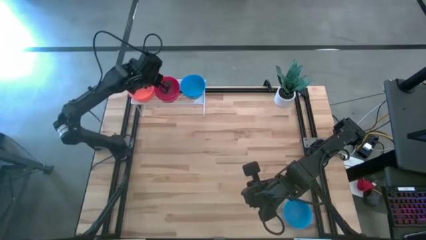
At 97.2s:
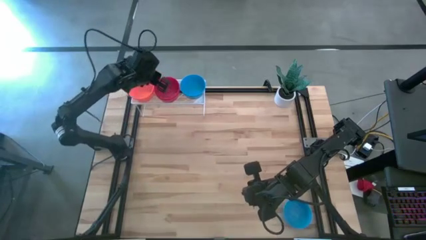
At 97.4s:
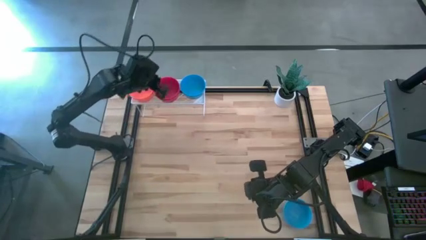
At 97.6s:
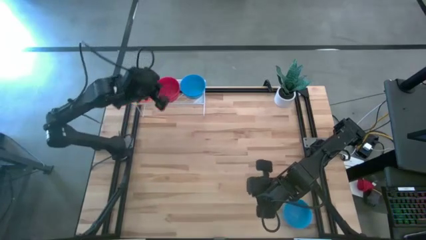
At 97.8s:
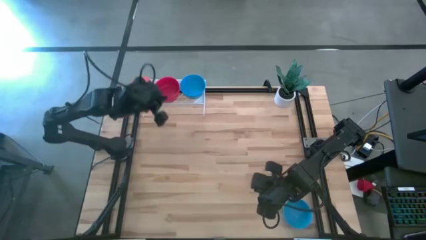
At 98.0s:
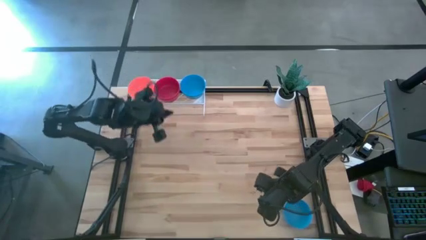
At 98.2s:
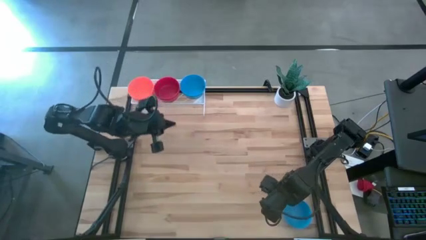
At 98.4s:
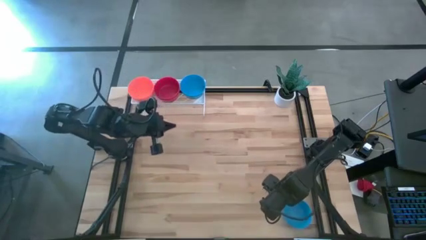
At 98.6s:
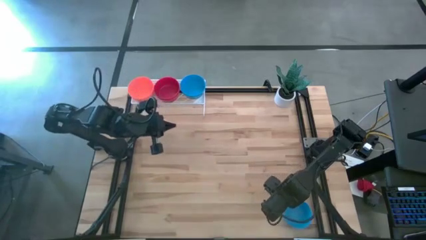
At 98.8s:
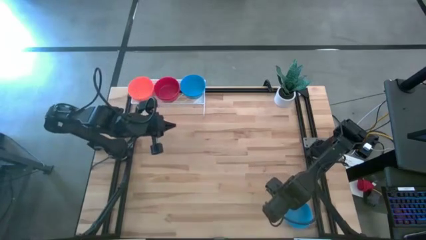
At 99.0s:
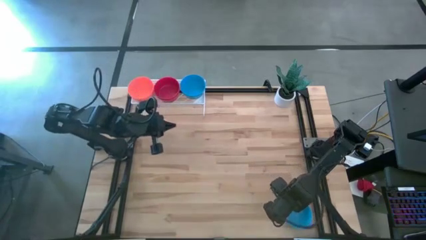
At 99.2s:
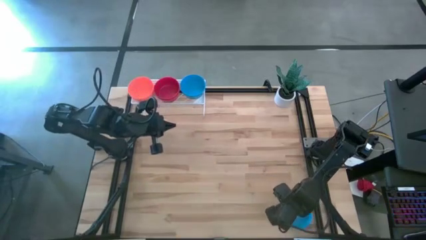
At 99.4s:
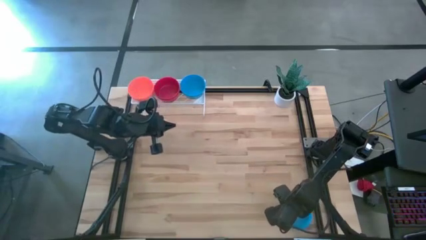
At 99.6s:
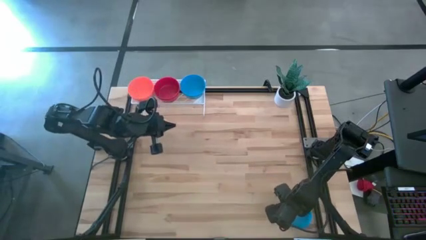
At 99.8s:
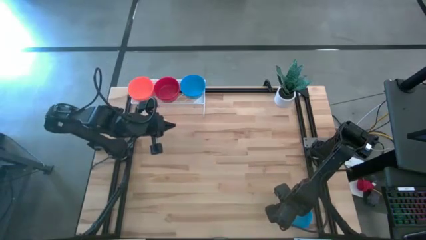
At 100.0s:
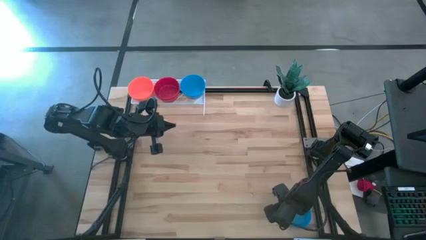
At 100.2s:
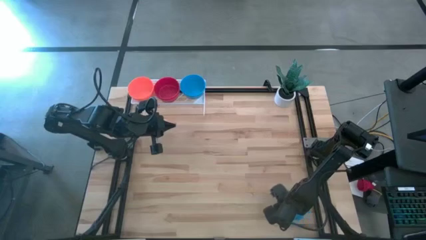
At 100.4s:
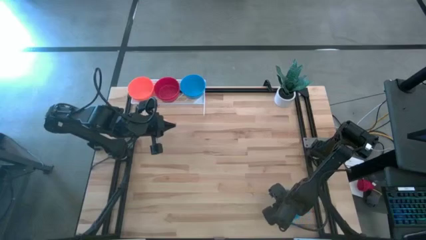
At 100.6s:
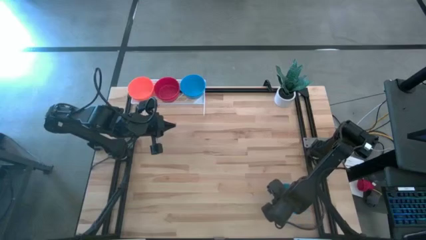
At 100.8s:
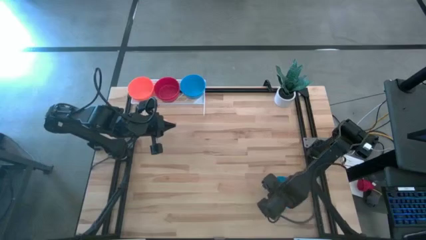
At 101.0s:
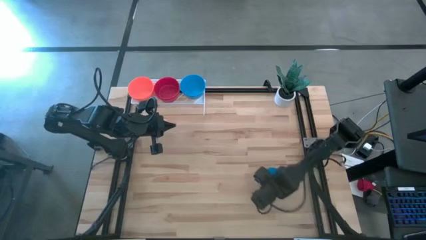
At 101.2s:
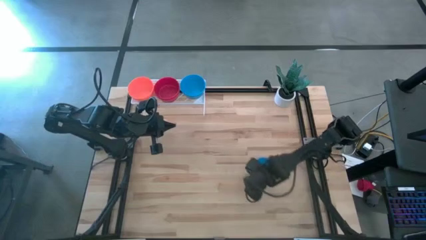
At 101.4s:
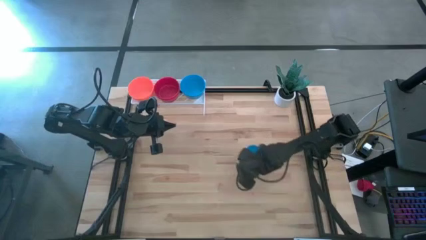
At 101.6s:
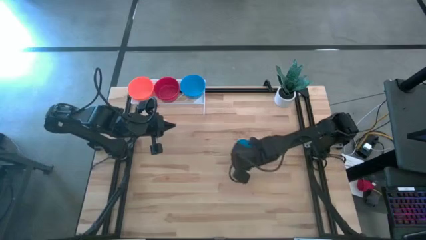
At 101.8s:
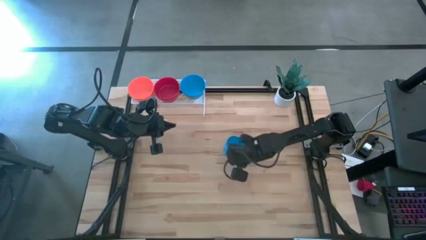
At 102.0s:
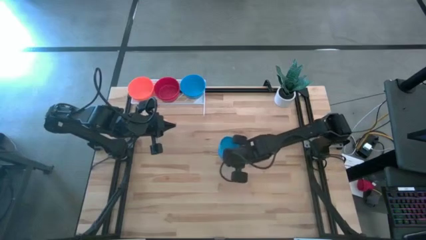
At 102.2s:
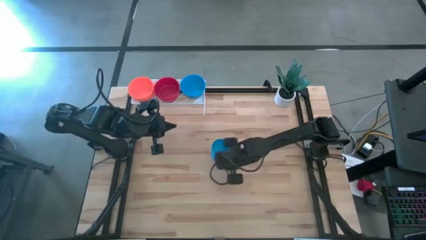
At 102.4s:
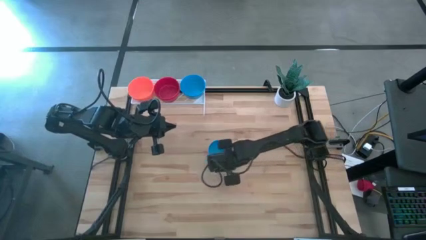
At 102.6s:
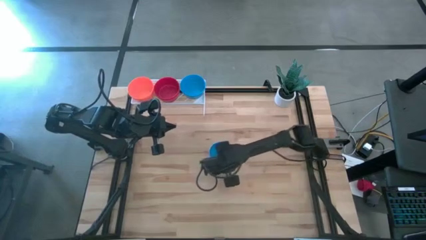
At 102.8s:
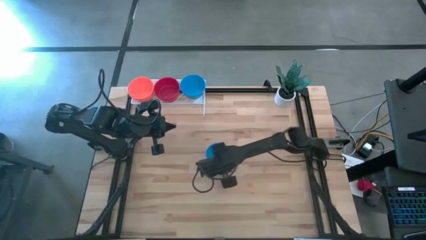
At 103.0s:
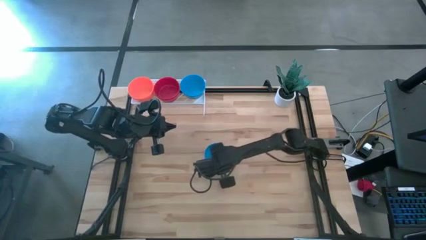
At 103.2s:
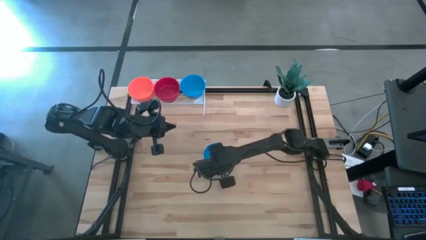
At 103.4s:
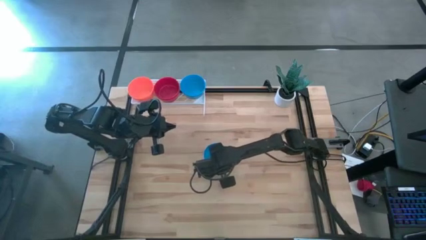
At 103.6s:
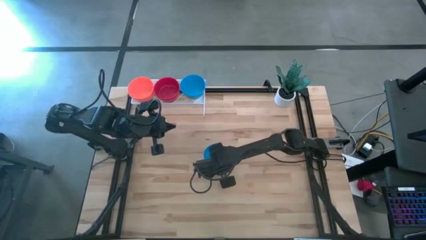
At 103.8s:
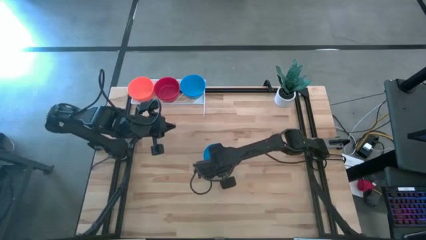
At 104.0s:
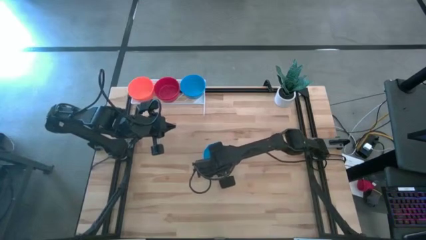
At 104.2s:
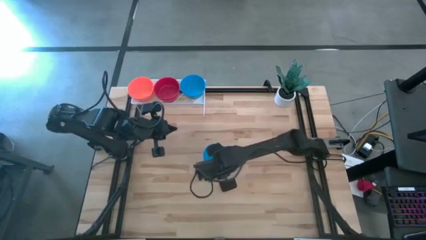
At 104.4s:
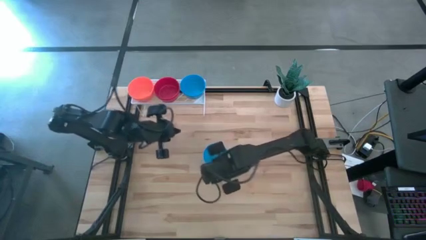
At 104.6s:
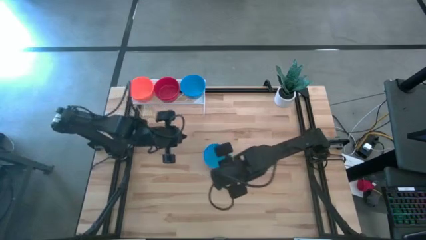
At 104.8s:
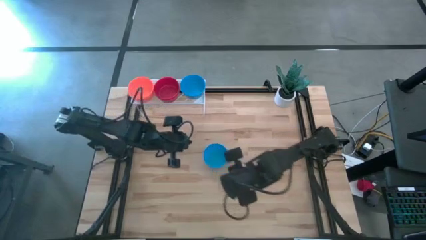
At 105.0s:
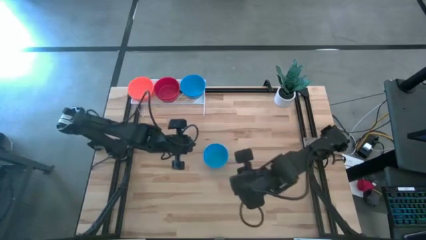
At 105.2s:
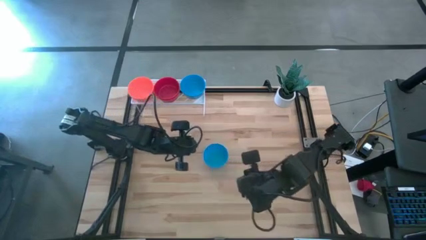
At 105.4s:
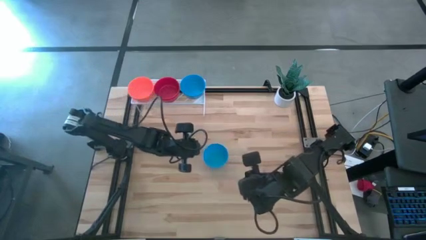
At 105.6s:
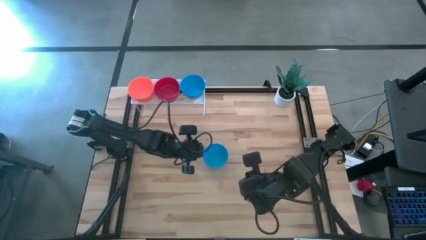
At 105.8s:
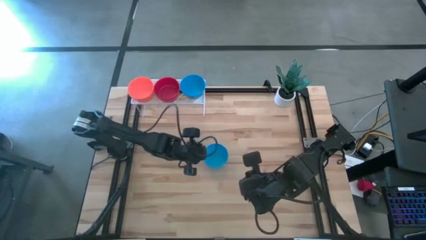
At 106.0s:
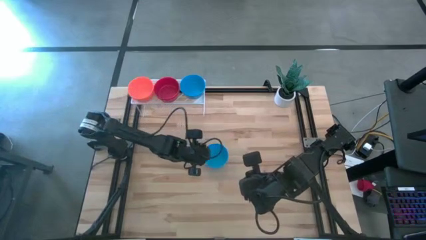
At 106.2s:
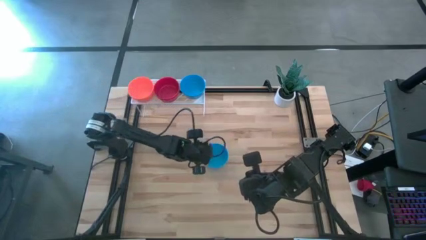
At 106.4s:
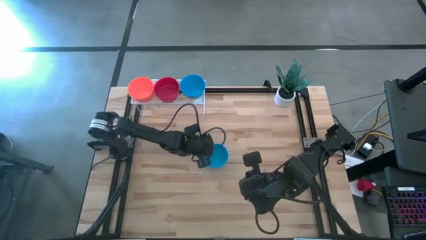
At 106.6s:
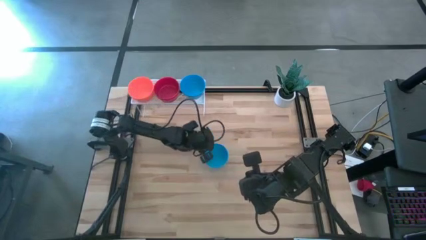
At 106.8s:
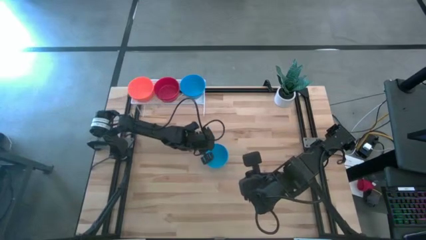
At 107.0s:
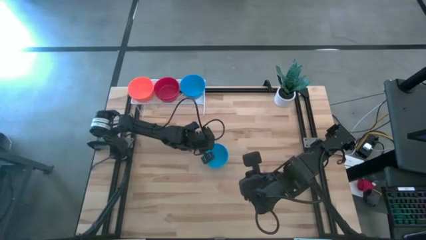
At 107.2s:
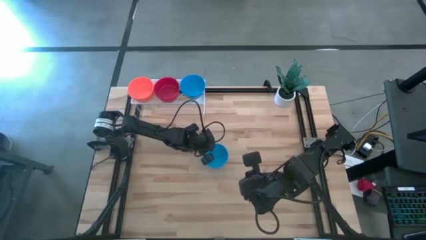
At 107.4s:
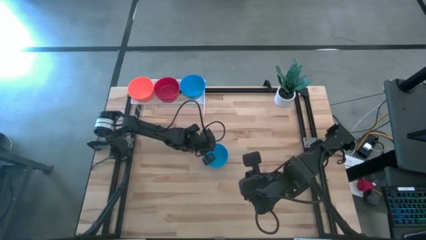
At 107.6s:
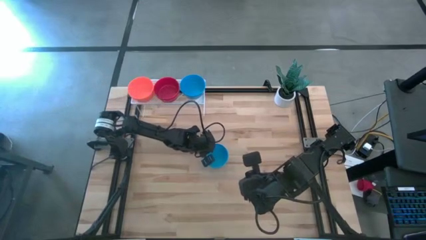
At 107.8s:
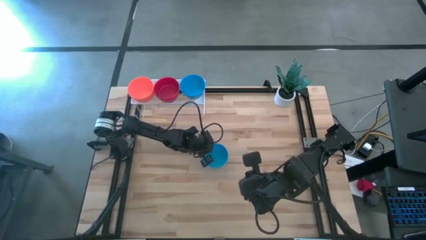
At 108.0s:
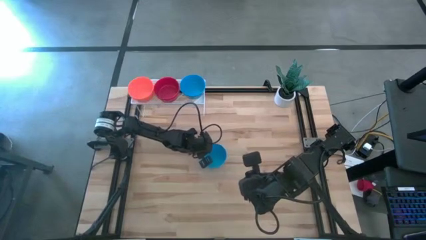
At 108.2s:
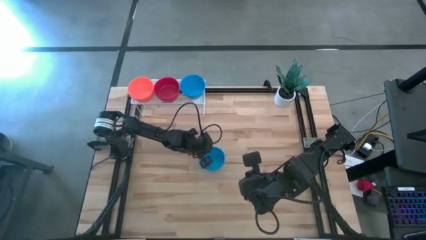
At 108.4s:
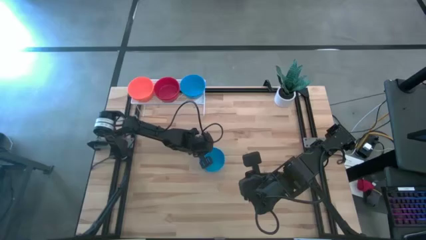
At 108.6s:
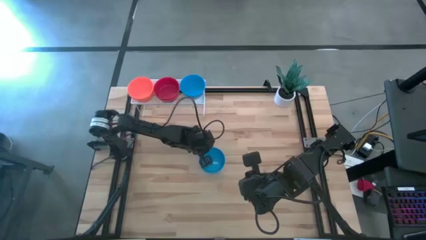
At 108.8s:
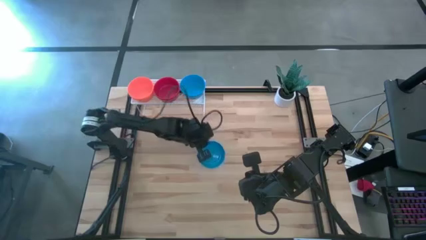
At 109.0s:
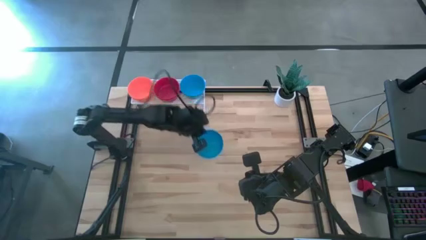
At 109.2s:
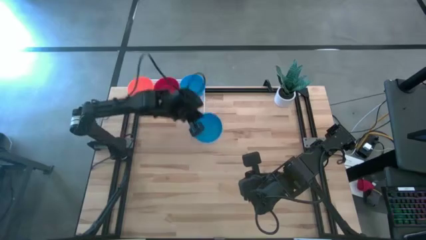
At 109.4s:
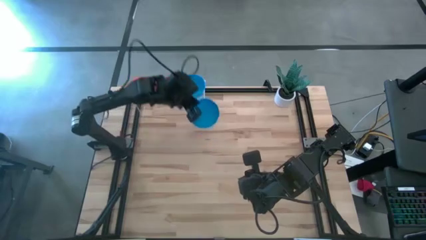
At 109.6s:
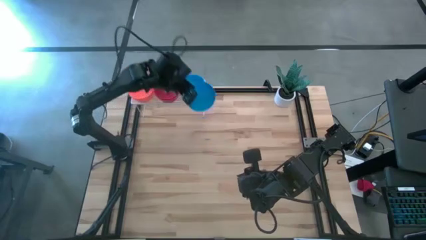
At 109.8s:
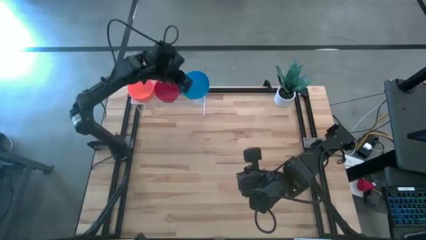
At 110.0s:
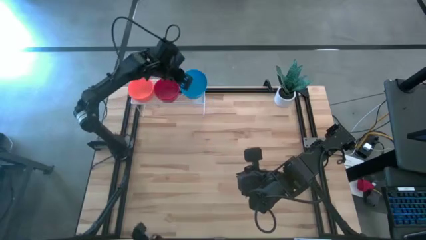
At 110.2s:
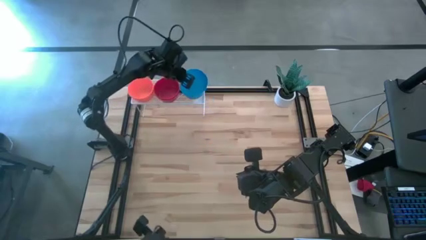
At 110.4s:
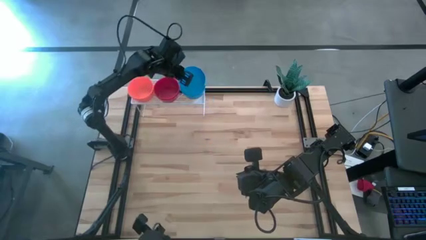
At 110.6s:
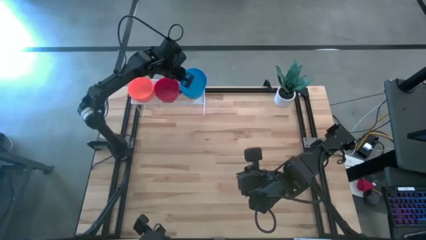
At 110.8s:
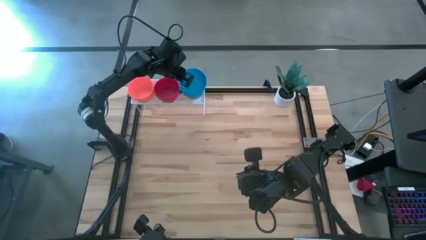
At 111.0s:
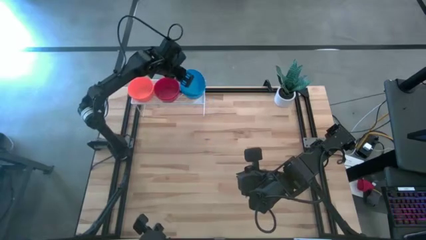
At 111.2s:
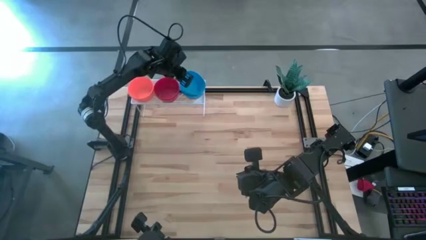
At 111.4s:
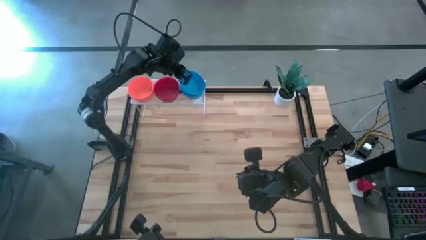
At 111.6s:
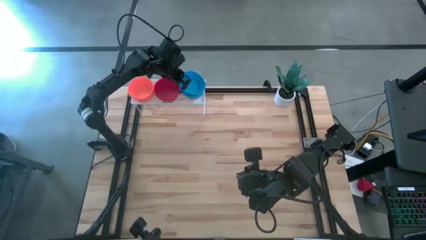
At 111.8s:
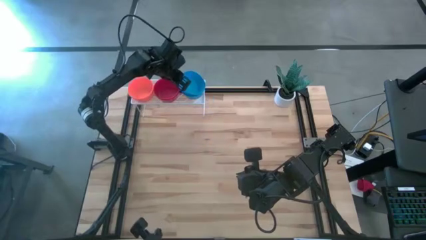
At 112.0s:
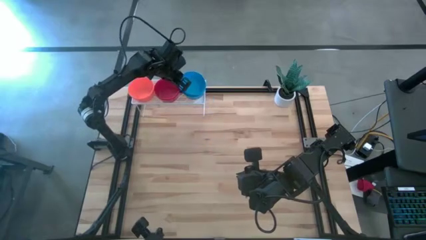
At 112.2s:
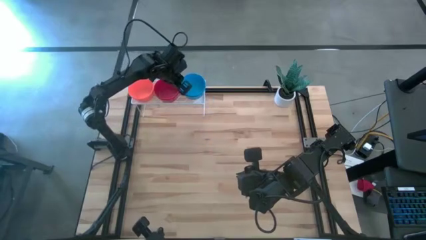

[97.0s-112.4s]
Task: Pick & Place Mini bowls
Stack the blue bowl on top of the blue bowl on the shelf

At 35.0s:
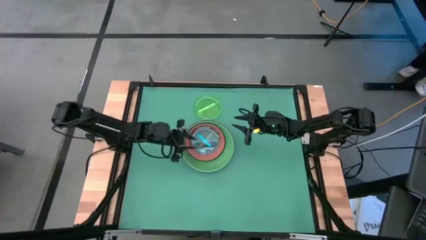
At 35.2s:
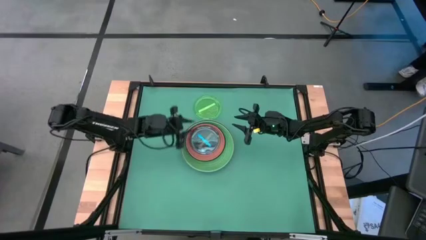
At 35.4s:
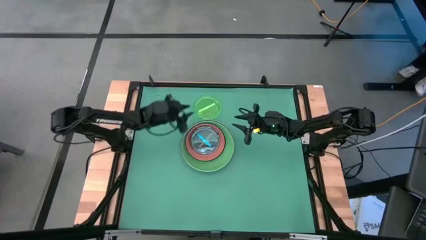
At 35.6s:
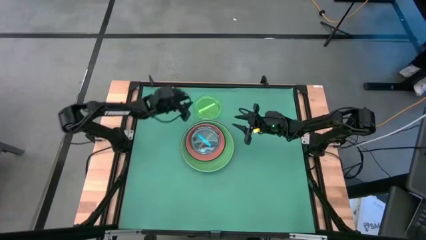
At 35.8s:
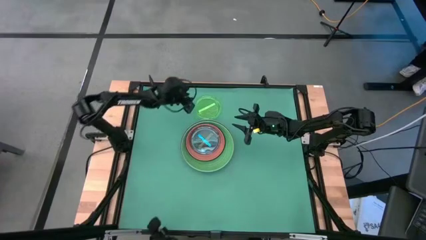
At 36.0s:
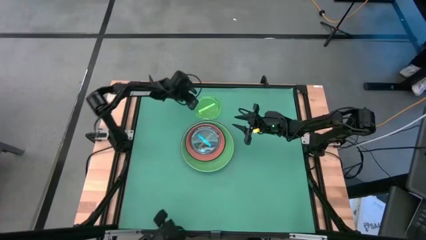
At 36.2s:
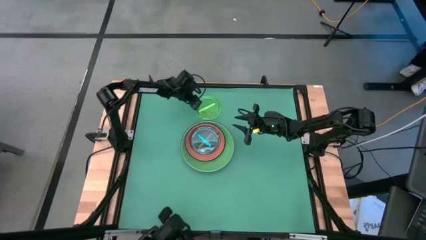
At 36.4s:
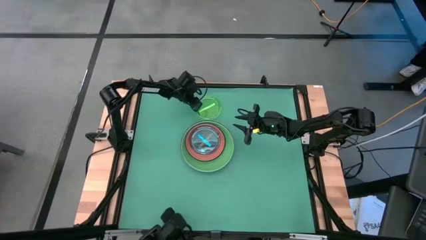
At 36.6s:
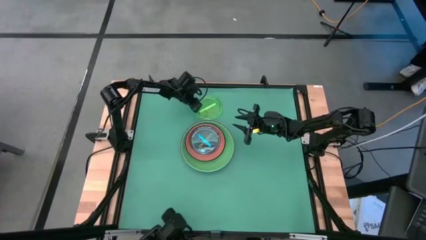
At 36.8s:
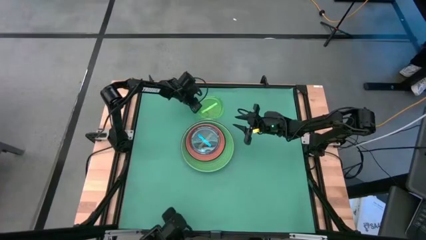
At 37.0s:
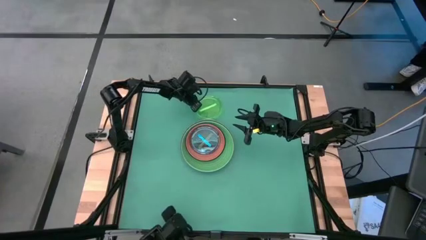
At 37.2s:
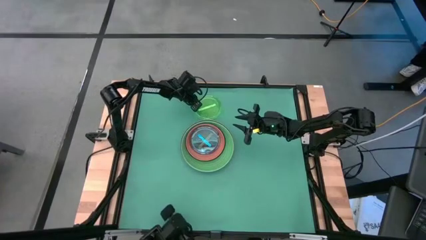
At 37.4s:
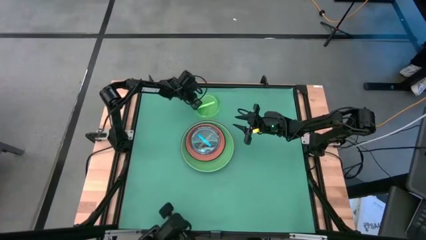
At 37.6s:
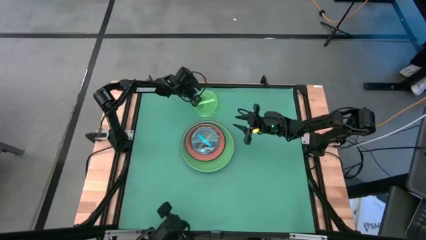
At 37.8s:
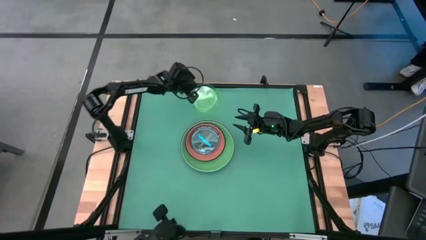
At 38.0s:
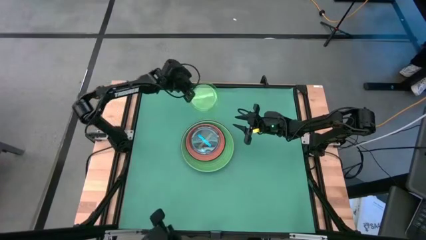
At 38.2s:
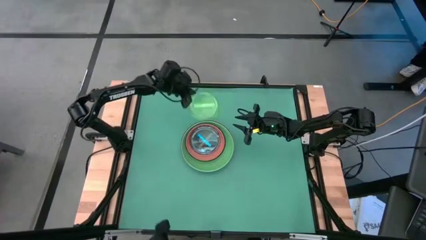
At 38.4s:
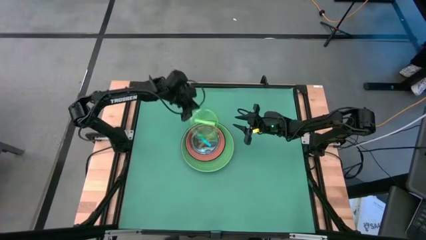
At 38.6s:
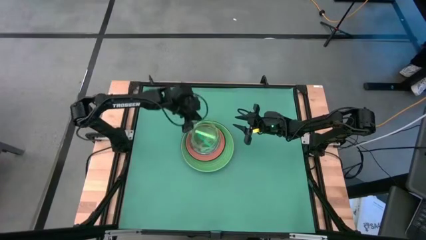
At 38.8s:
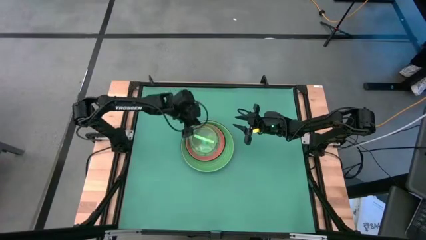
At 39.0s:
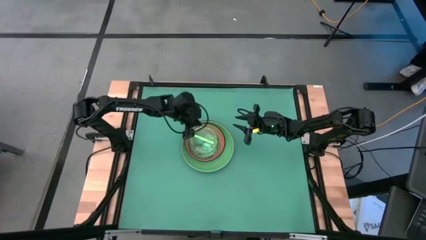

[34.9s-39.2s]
Task: Stack plastic plates
Stack the transparent green plate on top of the transparent blue plate
